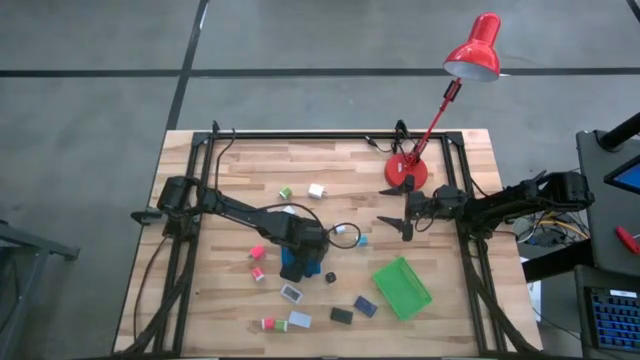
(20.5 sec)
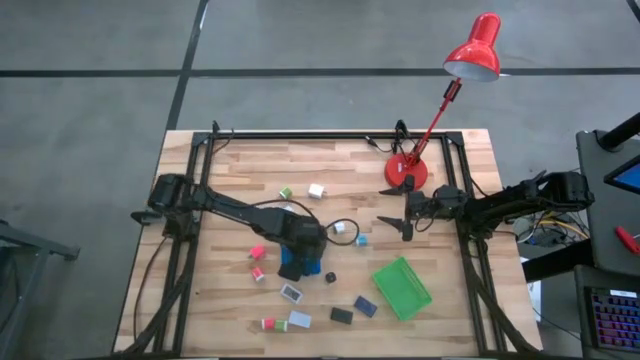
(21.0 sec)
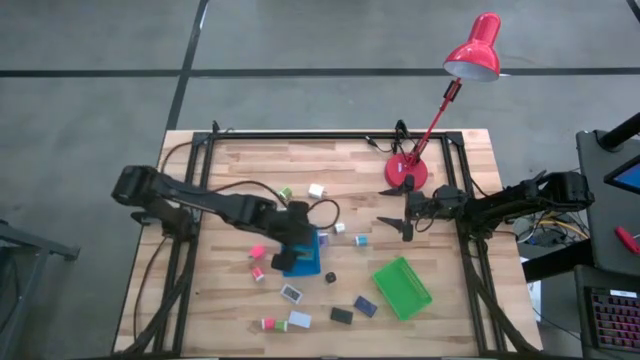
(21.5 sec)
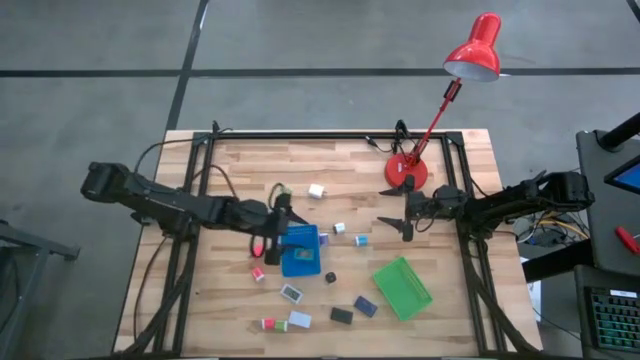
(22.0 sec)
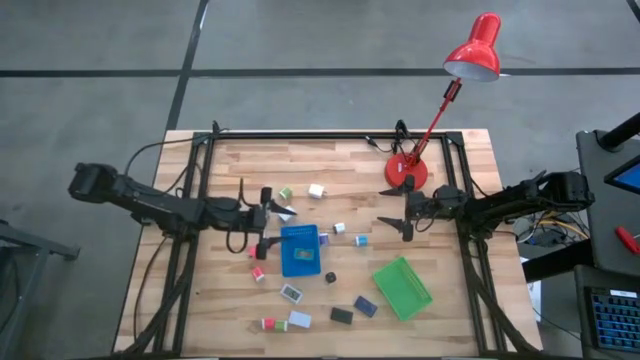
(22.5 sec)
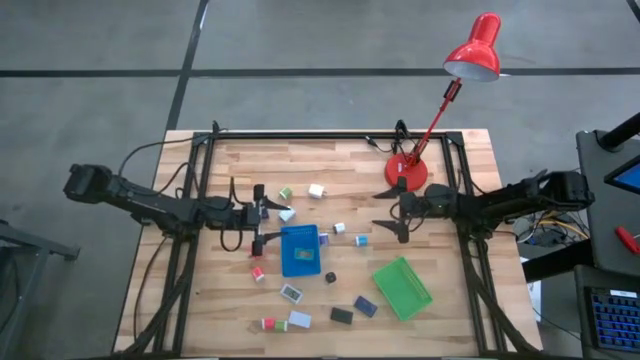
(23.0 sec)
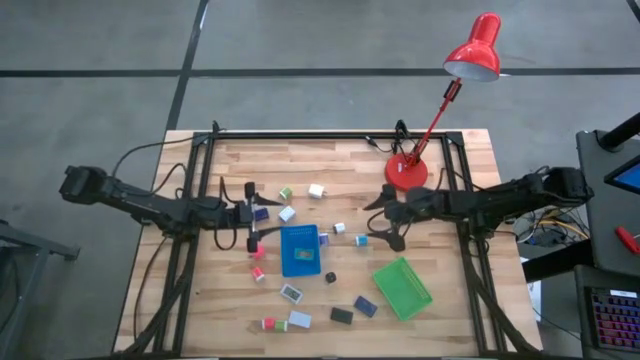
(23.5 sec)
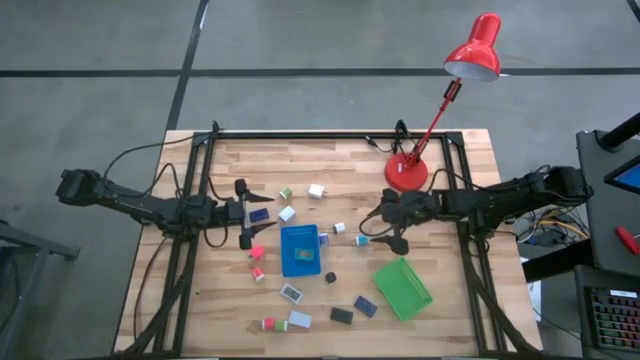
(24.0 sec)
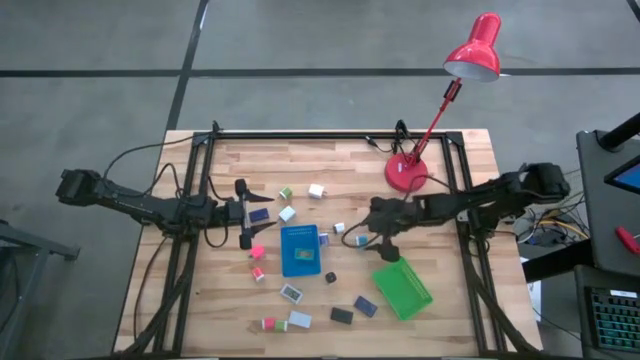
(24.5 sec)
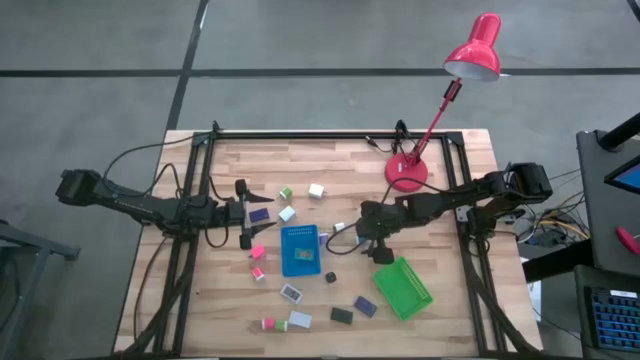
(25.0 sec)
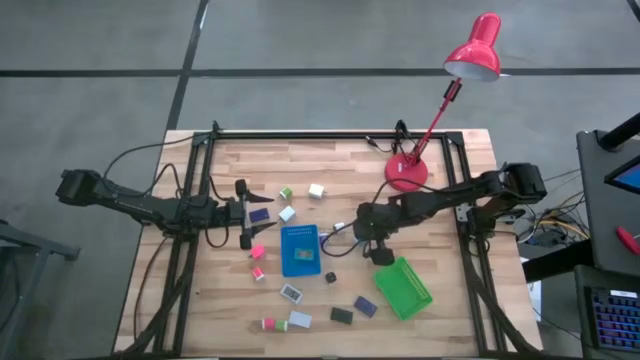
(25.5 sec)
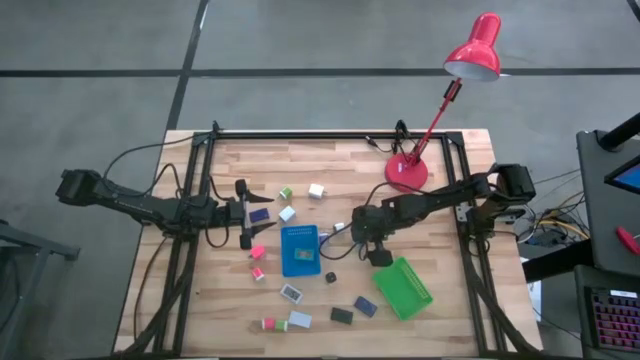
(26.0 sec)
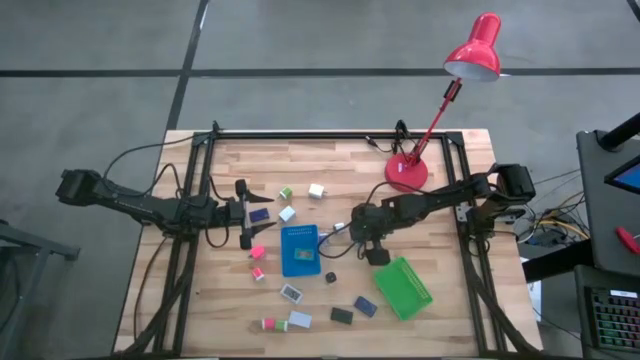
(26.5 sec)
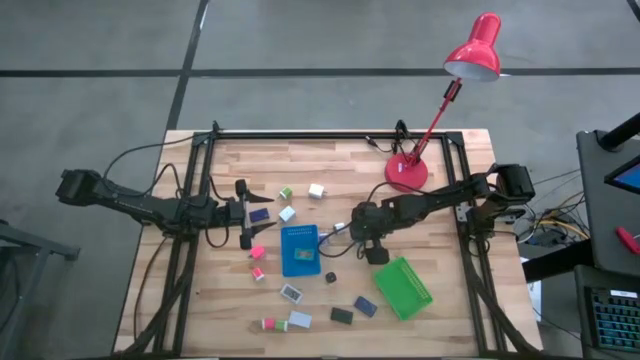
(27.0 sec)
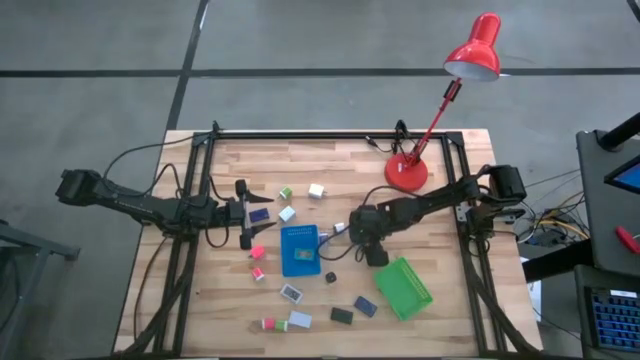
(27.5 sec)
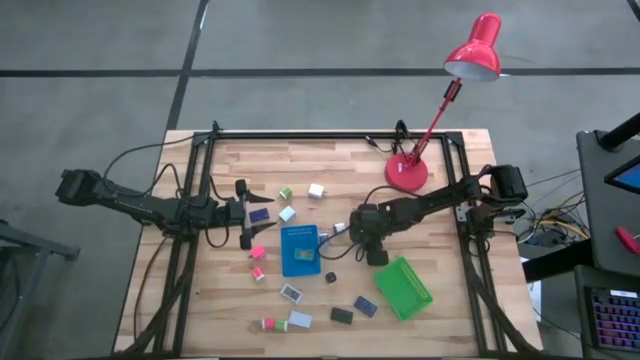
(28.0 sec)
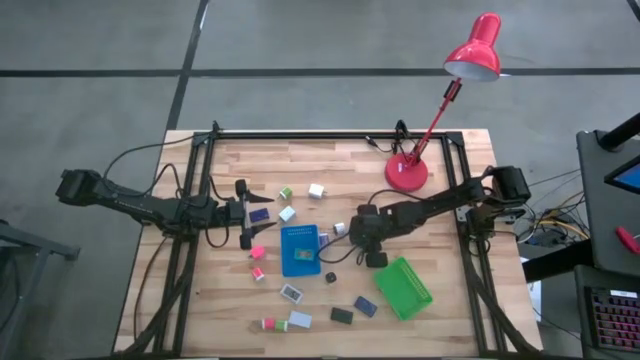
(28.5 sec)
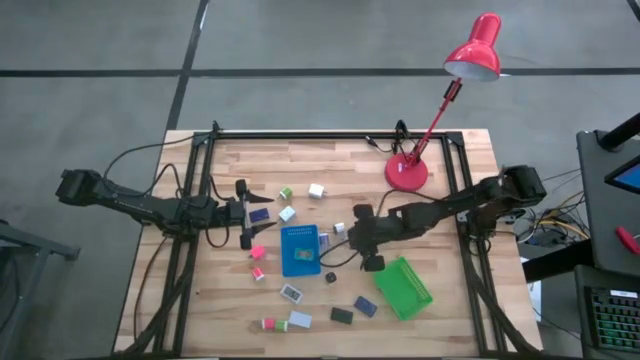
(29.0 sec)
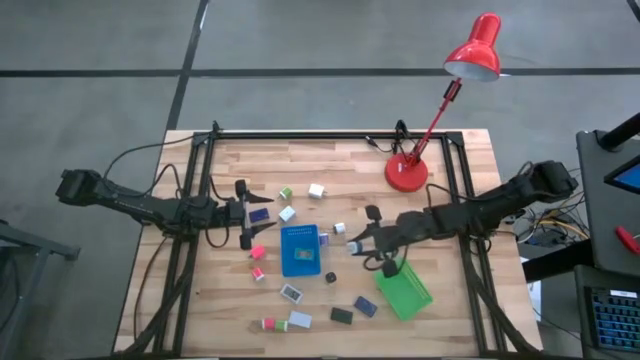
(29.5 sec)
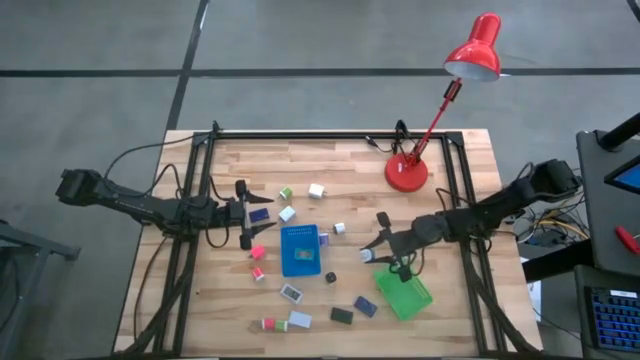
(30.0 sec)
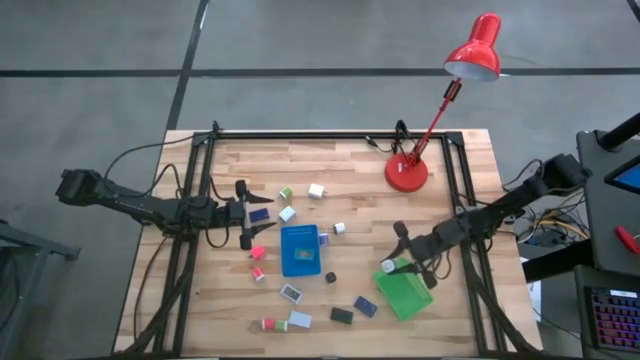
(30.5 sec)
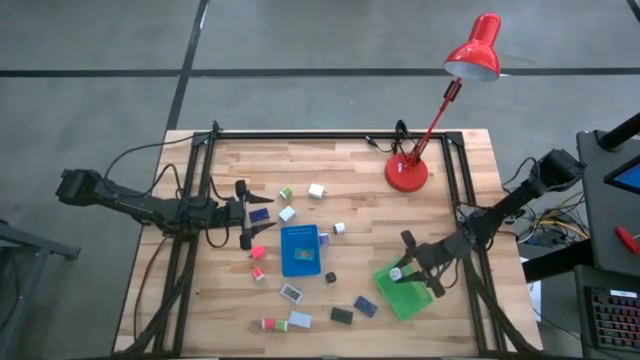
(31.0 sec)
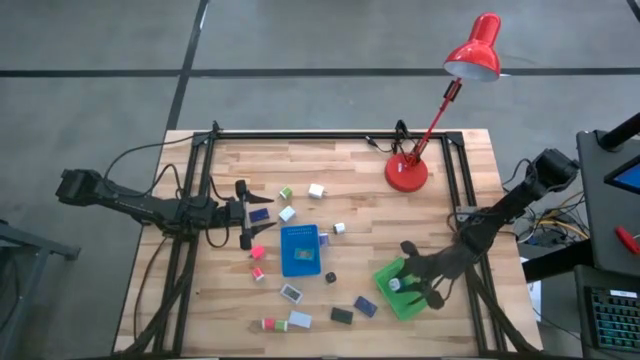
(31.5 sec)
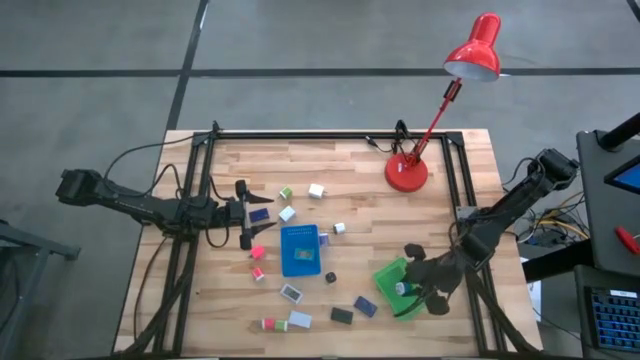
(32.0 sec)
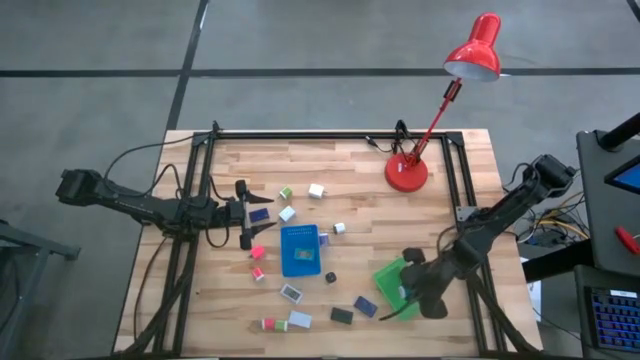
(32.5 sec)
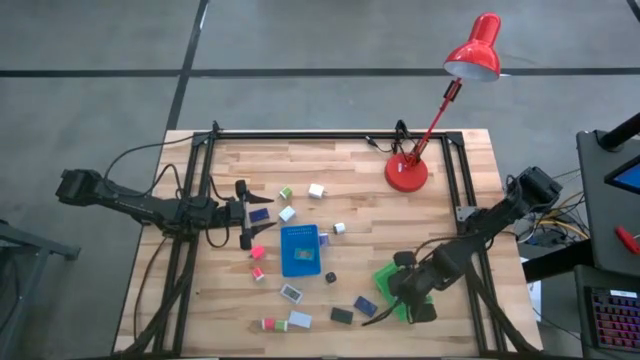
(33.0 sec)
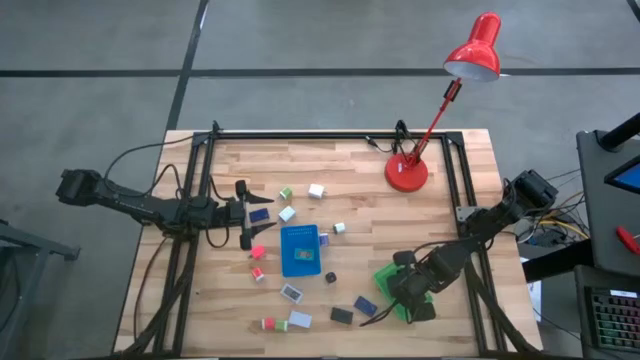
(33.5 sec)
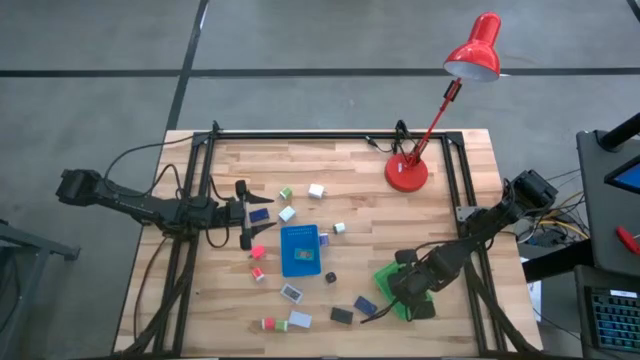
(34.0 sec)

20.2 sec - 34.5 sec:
Task: Pick & Place Office items
Put the blue charger adapter into the green bin
